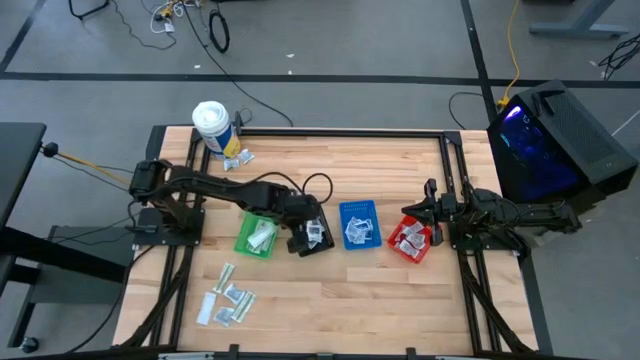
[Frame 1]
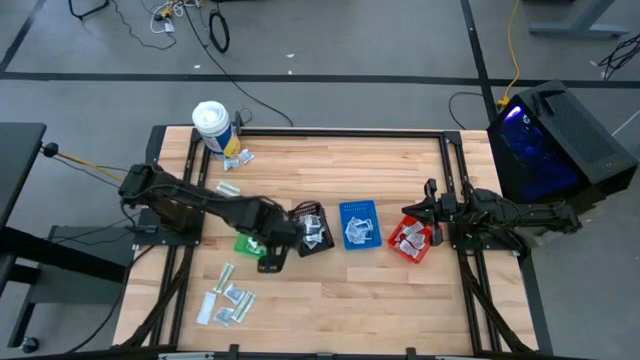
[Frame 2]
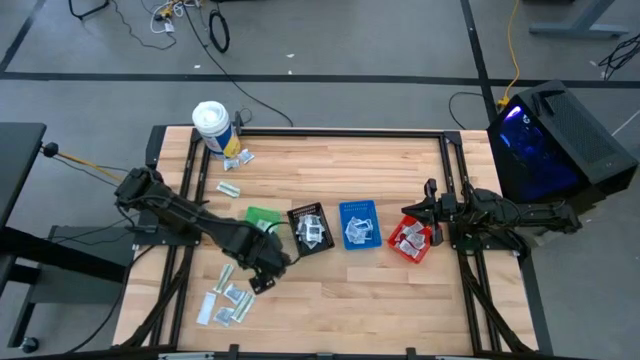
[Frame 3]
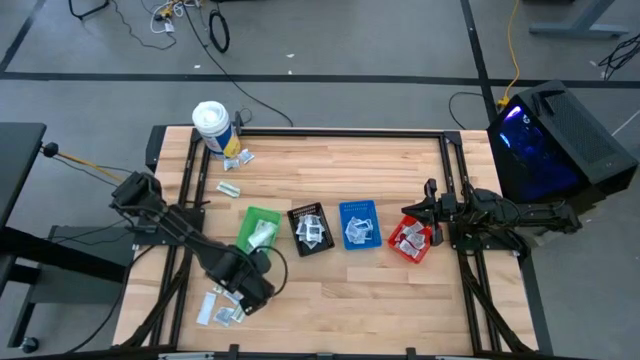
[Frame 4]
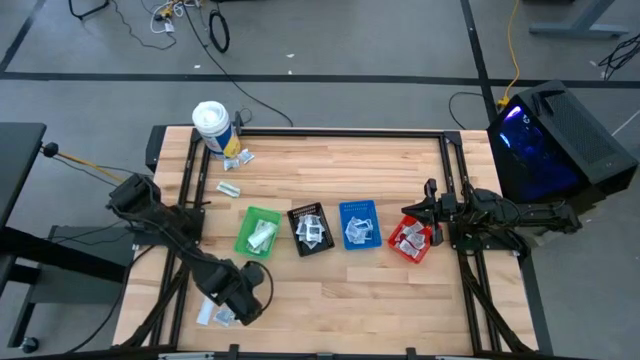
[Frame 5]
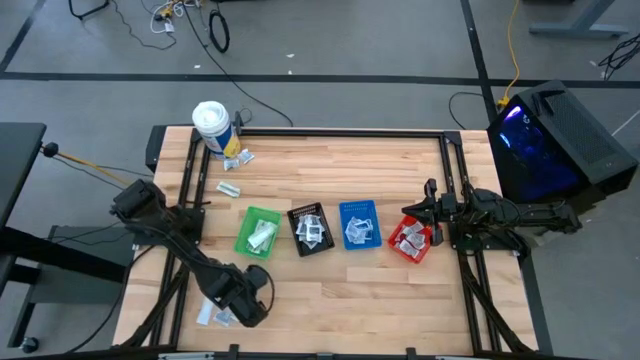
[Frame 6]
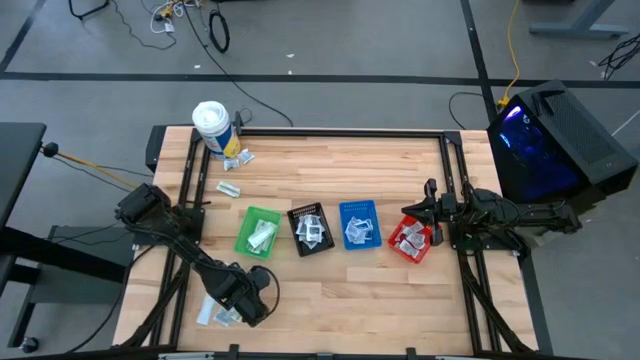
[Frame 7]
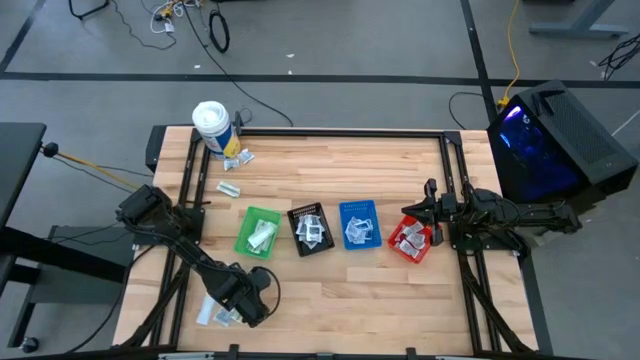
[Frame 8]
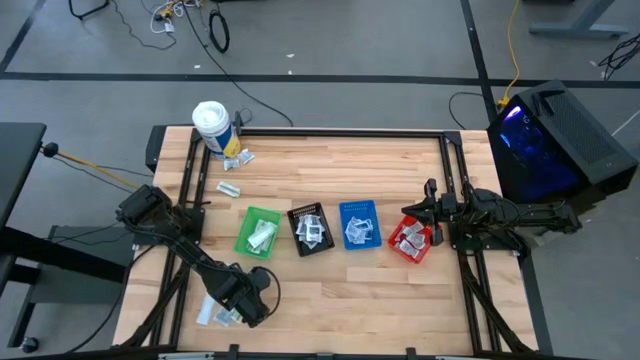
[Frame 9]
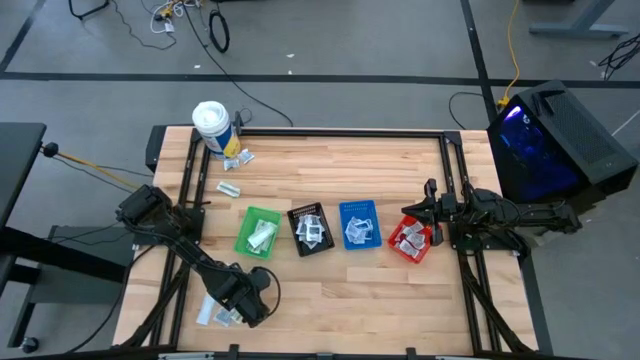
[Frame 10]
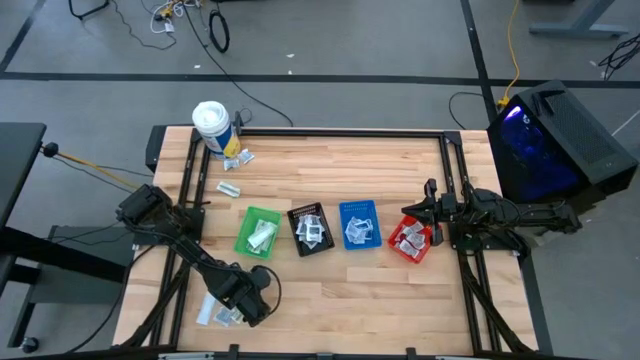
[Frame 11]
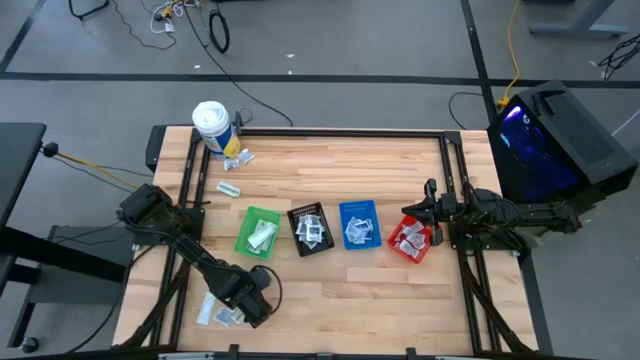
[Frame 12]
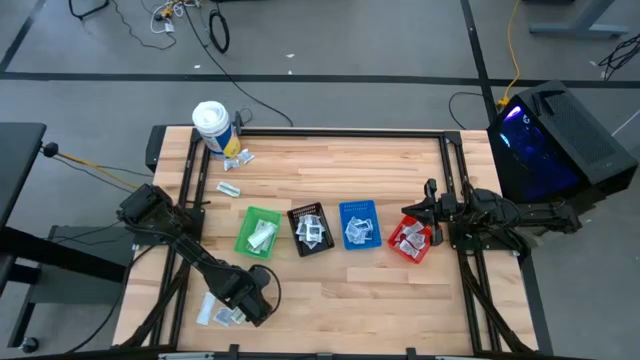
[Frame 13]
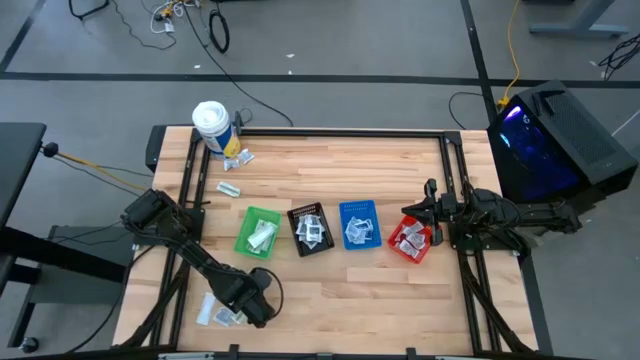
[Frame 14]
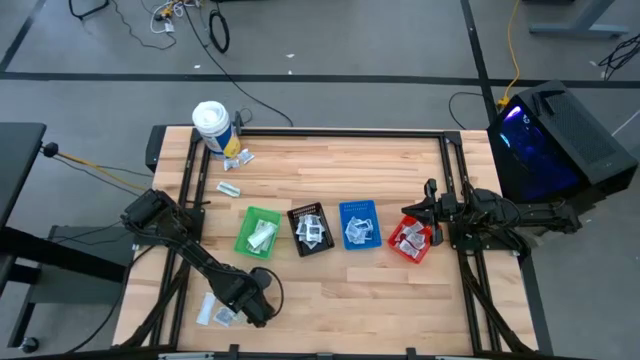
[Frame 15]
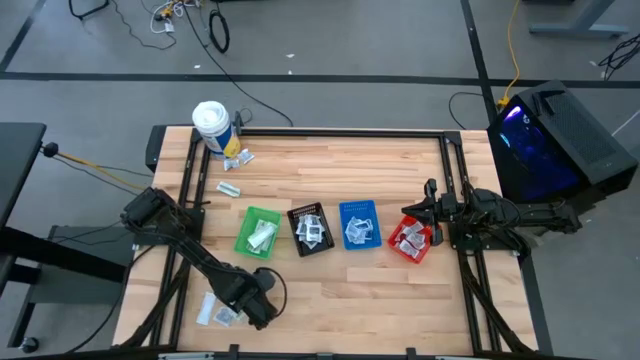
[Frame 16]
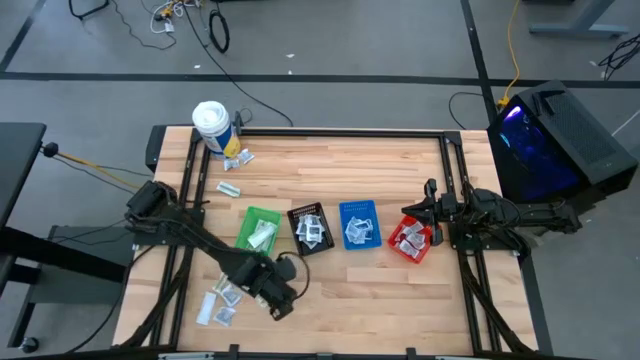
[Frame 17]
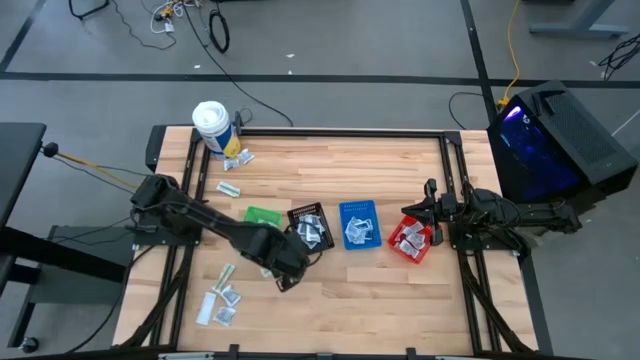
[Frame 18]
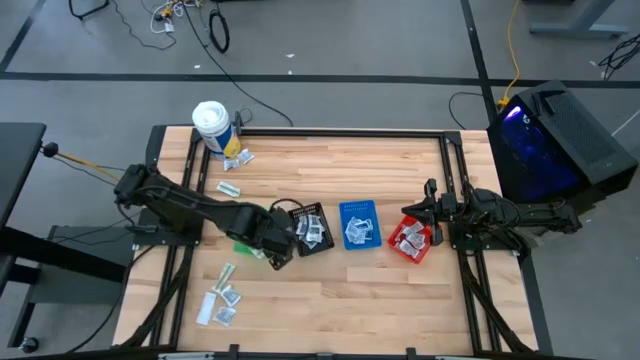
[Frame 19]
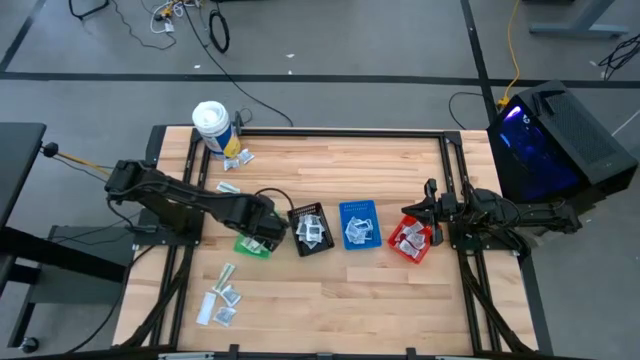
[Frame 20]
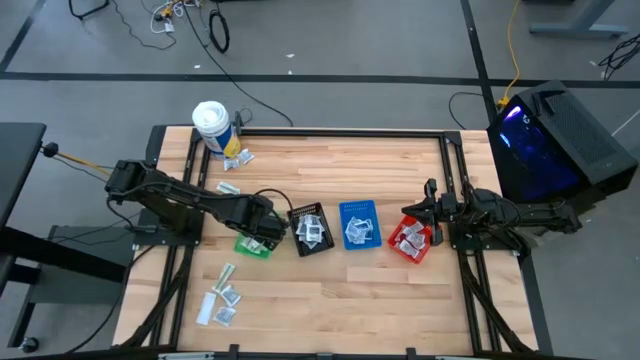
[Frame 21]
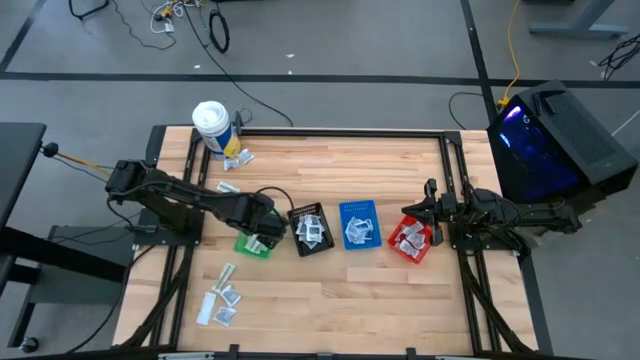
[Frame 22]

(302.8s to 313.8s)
Task: Pick & Place First Aid Supplies
Put the bandage into the green basket
